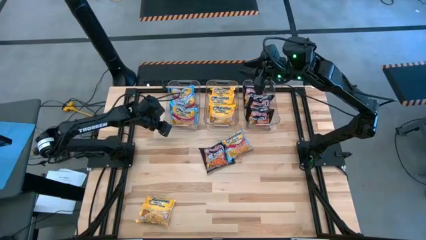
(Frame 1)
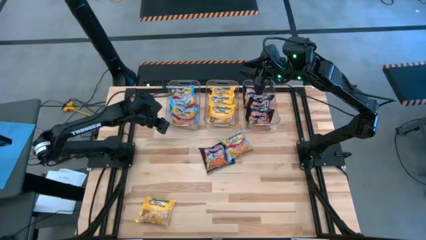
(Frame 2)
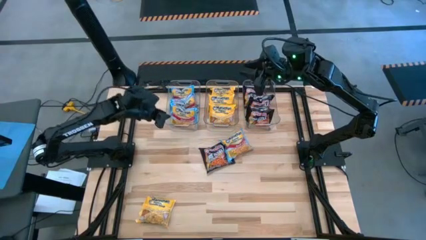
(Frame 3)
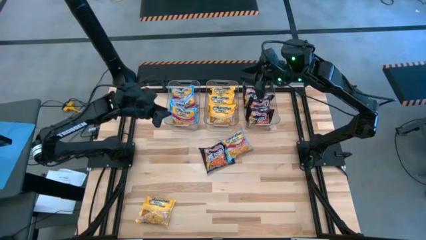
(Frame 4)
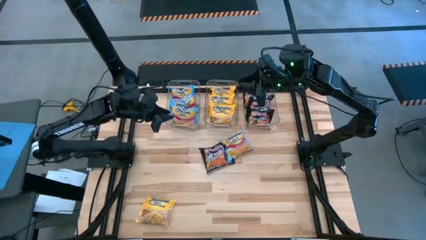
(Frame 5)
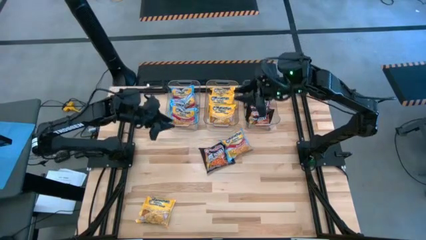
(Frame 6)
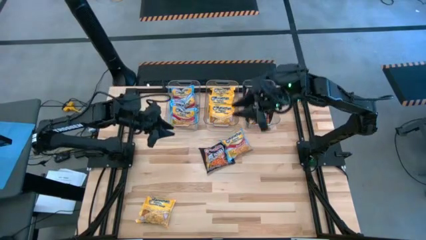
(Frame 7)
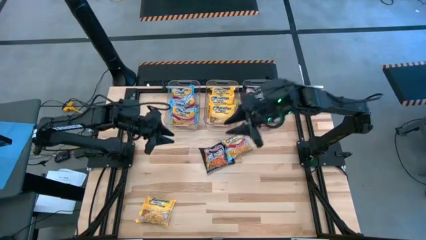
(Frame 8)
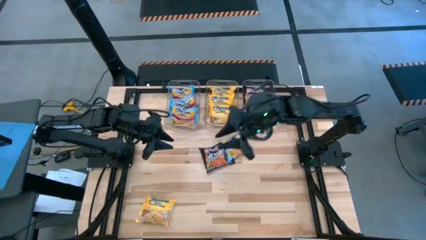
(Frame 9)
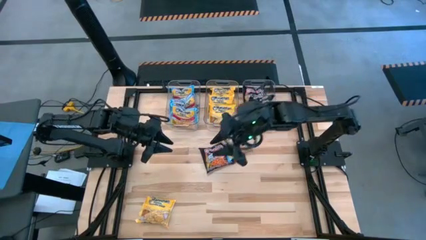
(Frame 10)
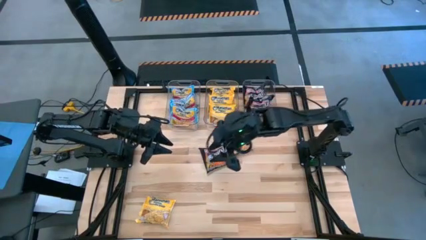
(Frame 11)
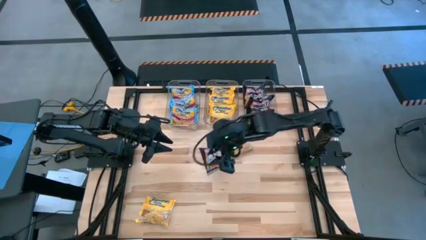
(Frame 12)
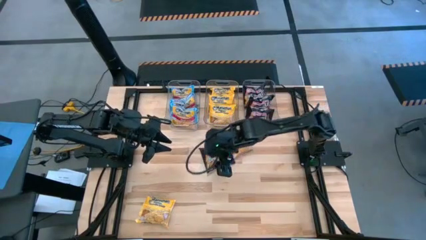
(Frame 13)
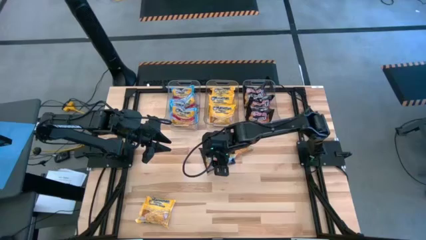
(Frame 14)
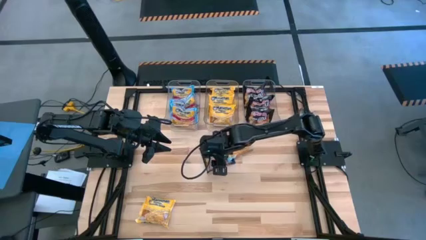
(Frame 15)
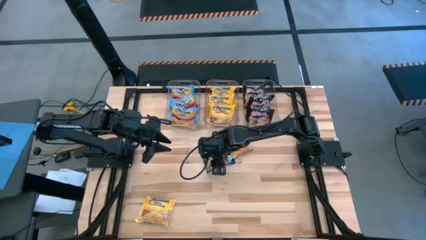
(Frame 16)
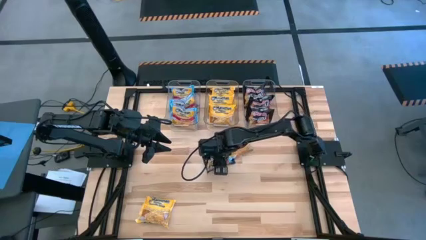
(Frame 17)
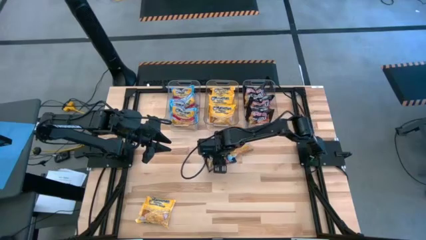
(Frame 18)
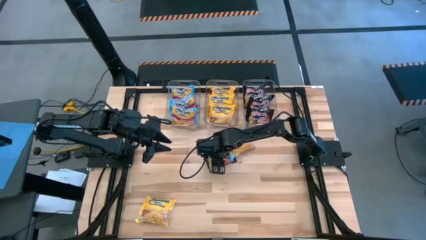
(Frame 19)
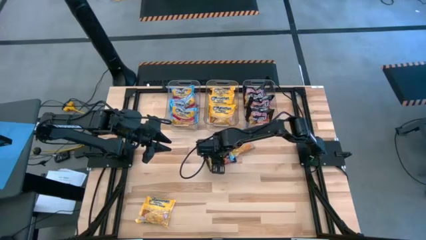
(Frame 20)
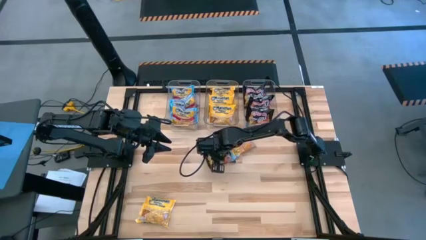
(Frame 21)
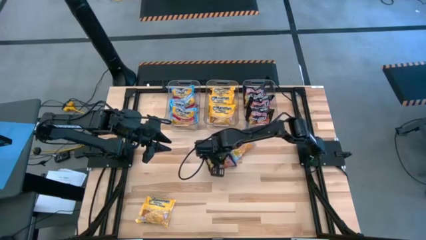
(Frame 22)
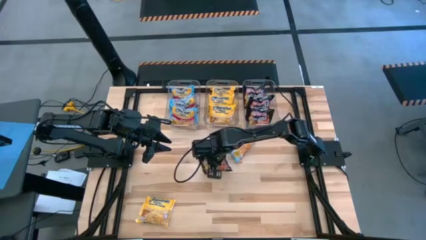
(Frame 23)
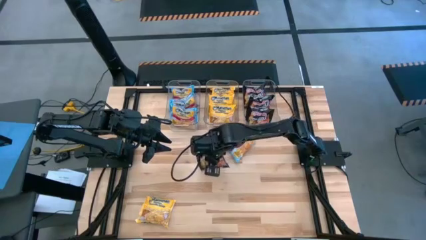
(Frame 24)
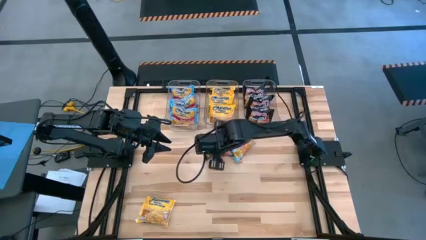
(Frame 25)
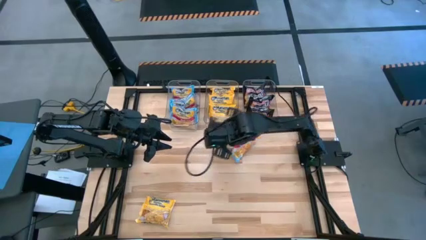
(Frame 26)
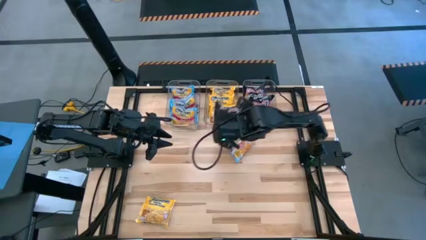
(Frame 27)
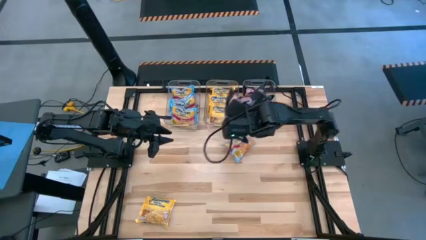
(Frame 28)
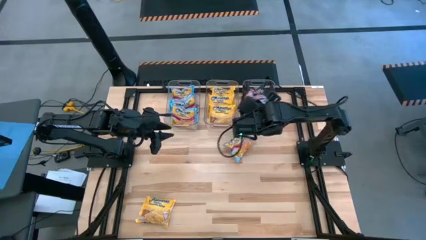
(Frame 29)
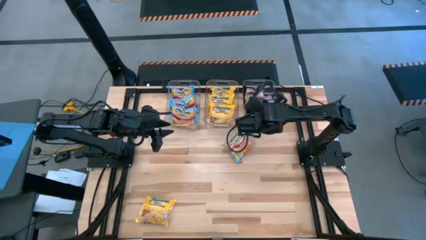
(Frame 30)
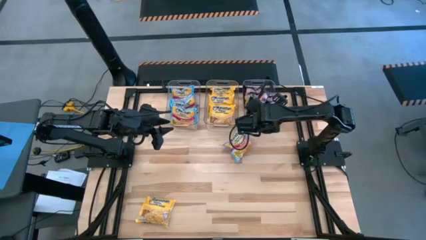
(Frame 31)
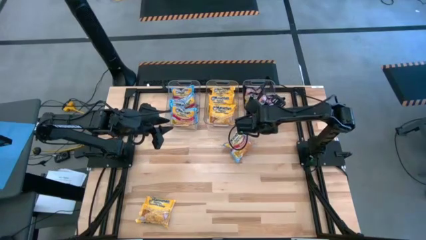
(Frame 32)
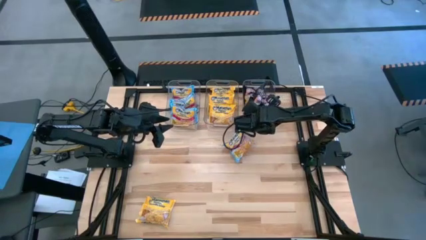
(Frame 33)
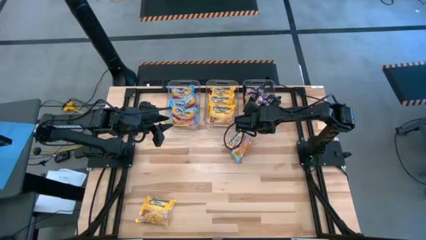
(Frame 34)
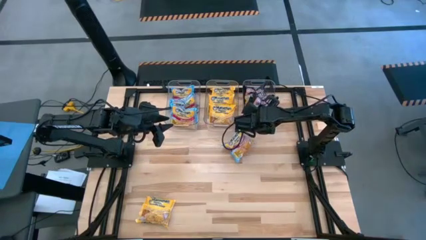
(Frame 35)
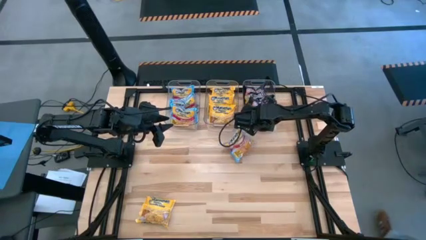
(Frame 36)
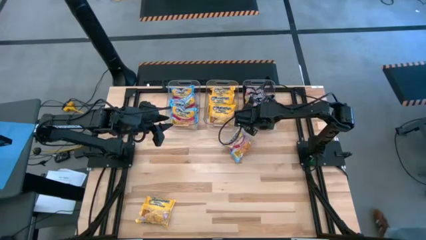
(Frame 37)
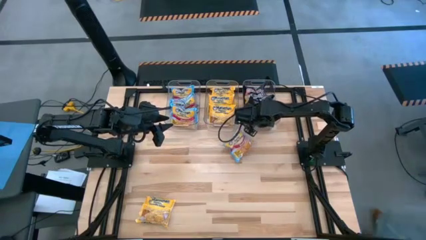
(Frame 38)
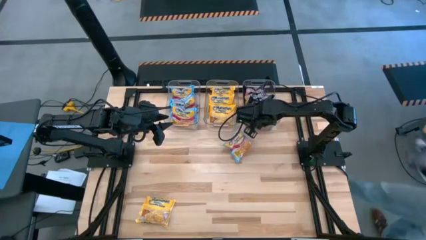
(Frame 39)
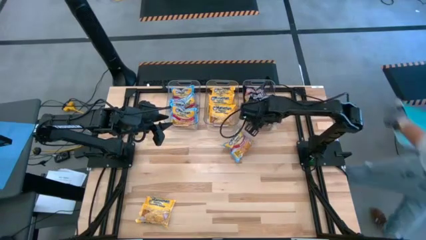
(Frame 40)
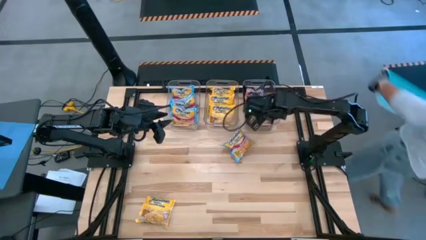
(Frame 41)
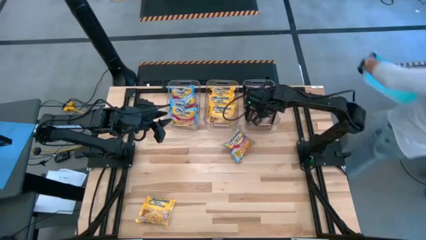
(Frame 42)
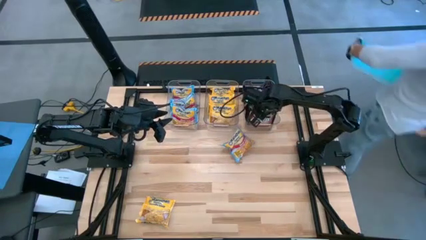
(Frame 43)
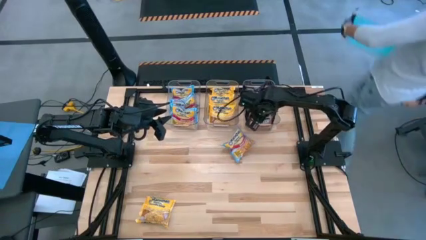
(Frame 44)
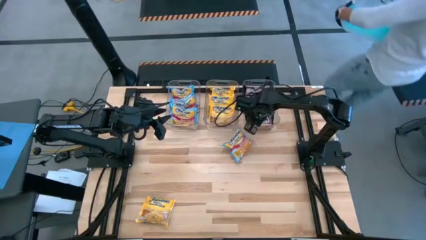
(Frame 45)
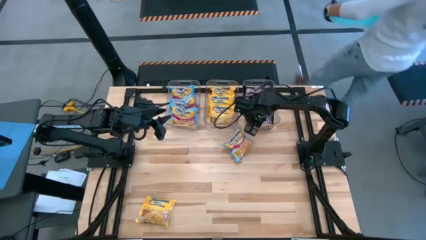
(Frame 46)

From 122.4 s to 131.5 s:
Task: Sort Maruchan noodles
Put the black noodle pack into the right transparent bin
